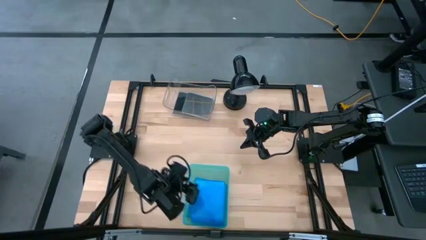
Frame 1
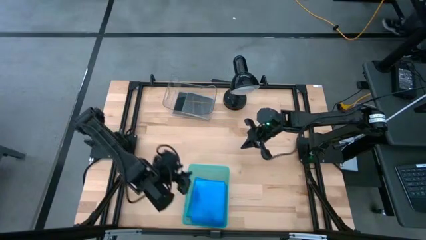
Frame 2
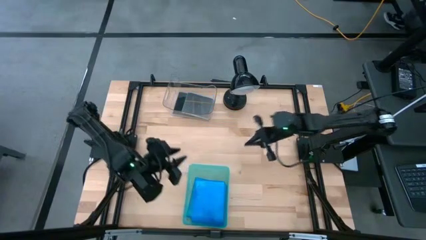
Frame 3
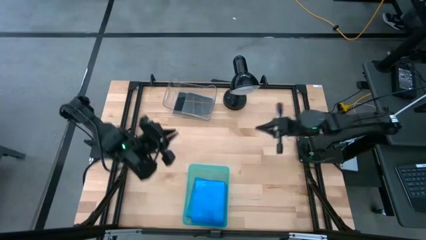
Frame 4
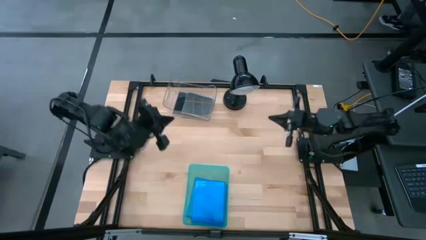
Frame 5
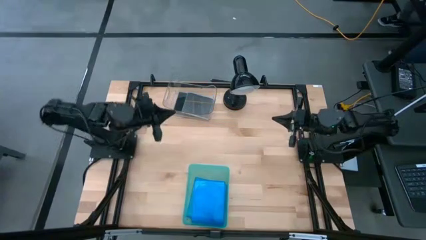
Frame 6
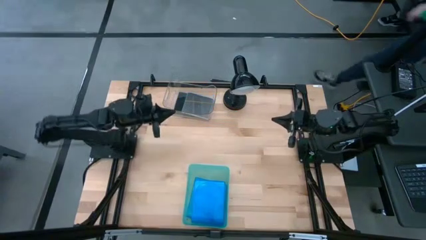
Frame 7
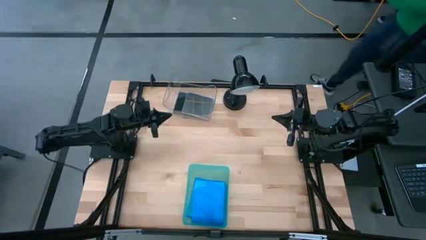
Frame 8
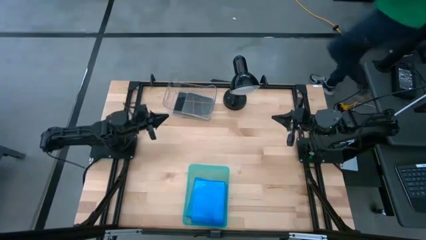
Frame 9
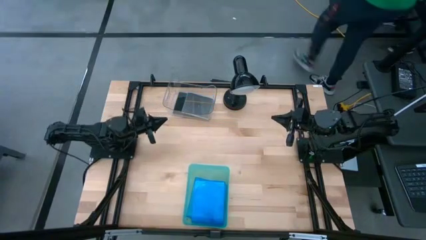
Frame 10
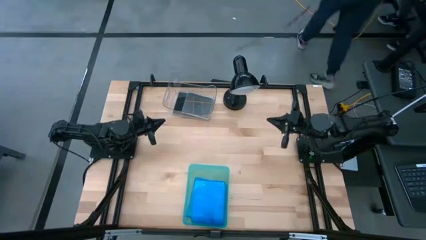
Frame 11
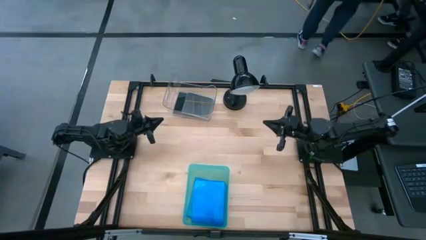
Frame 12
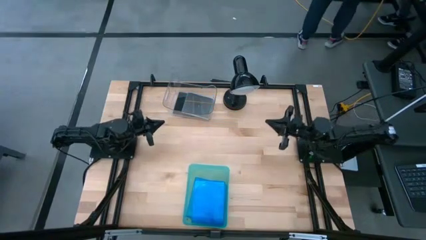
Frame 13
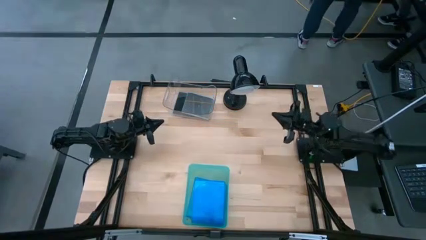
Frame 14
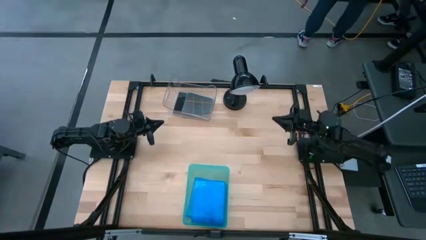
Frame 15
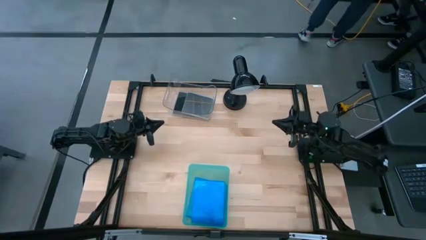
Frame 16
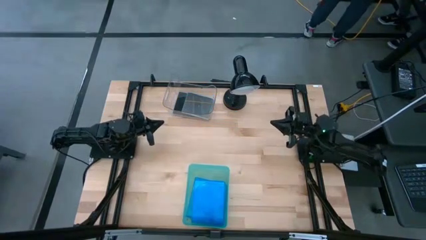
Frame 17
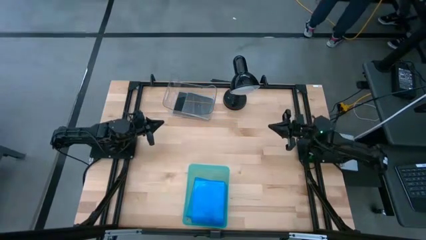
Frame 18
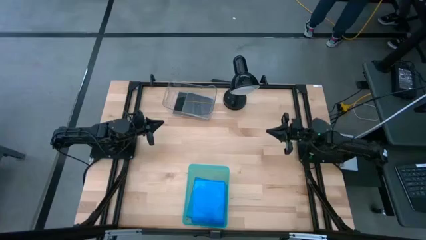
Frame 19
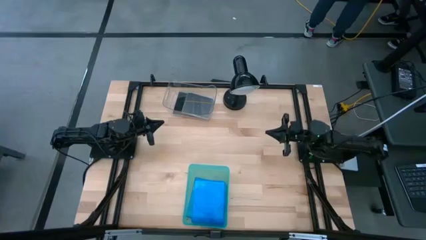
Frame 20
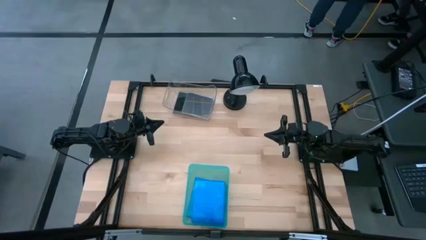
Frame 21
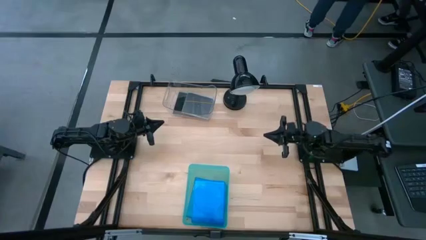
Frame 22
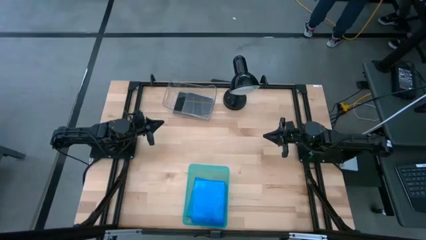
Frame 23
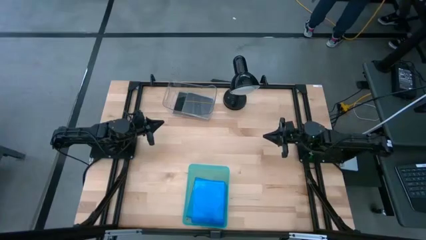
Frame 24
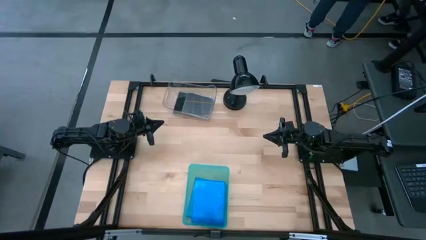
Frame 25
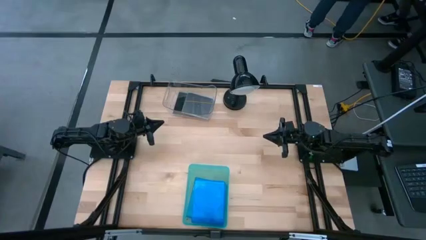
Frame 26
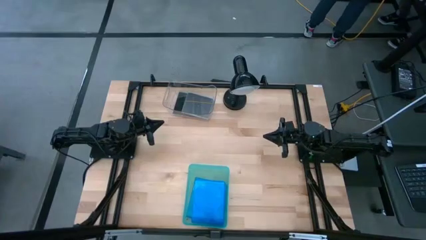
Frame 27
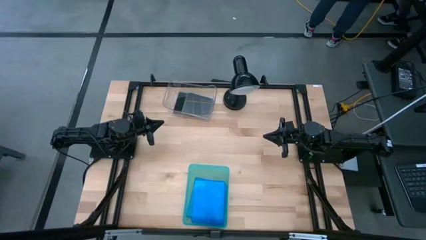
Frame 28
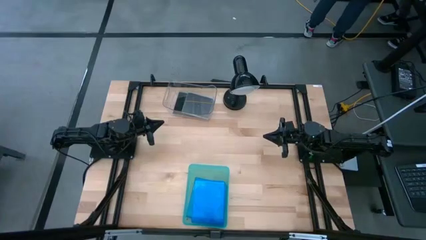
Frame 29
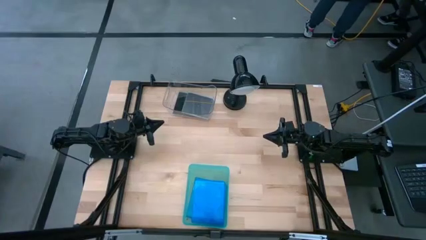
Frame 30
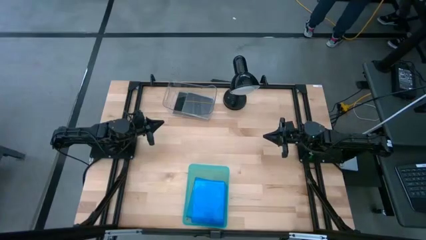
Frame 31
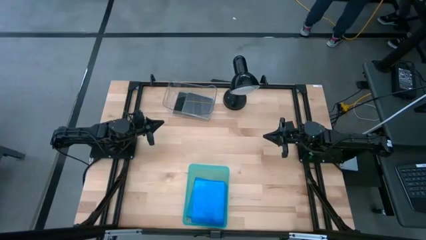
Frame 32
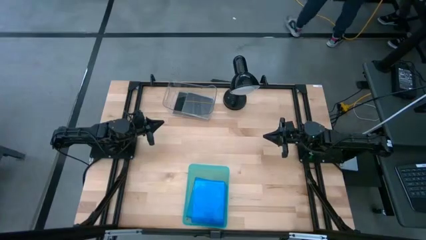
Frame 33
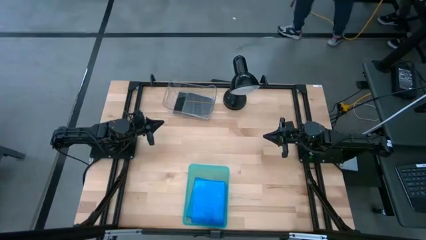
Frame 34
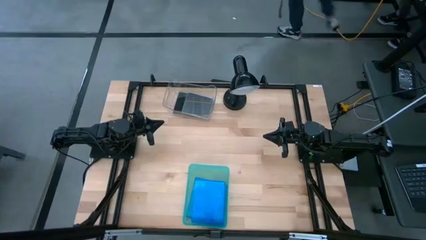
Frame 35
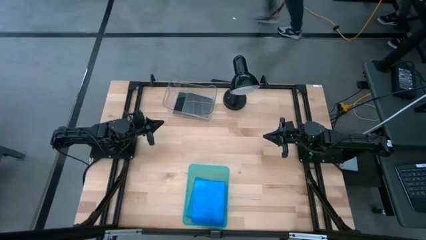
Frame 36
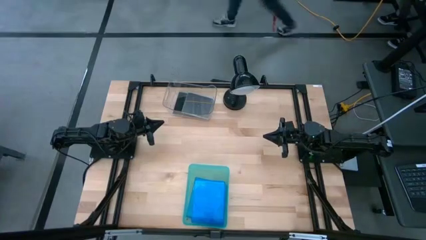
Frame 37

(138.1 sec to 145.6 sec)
Task: Pick & place jewel cases by type
Return to Home Position

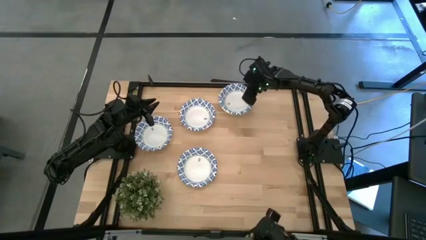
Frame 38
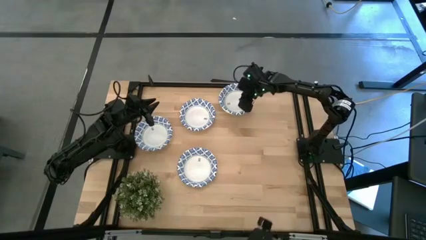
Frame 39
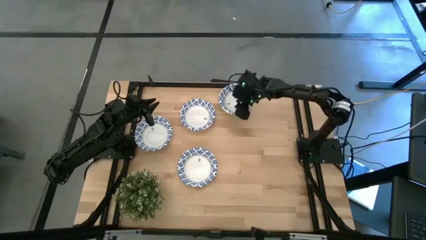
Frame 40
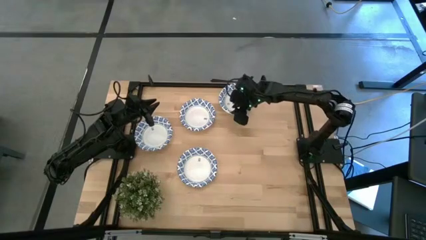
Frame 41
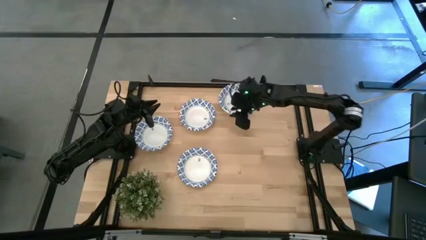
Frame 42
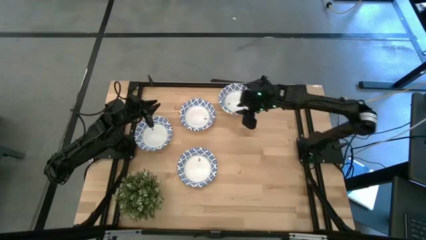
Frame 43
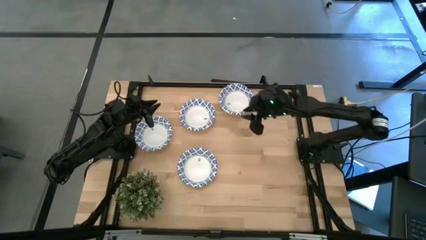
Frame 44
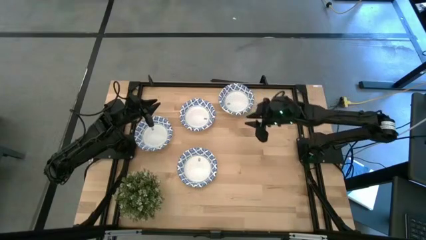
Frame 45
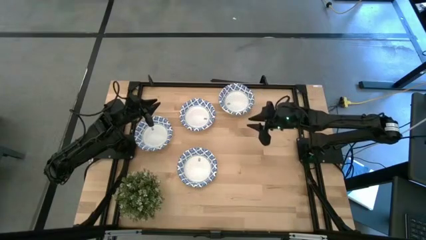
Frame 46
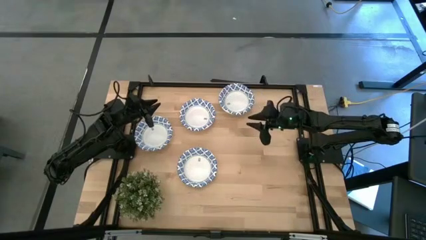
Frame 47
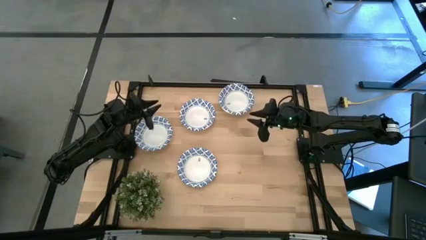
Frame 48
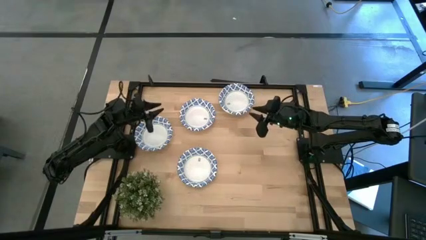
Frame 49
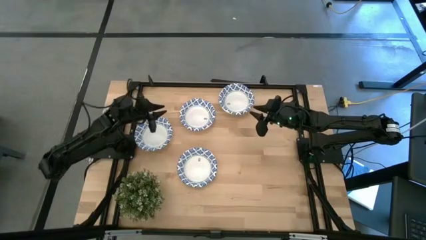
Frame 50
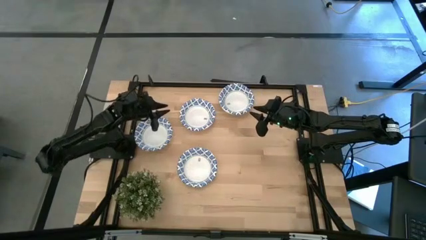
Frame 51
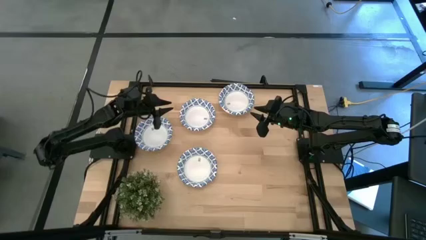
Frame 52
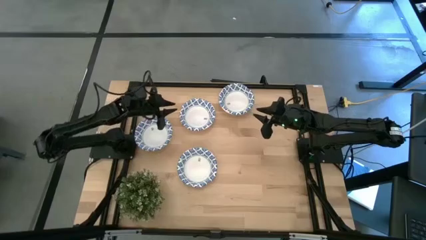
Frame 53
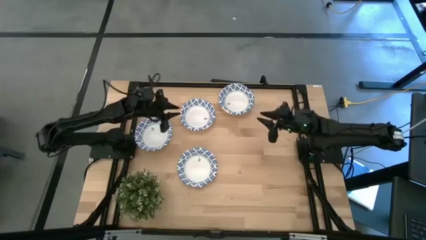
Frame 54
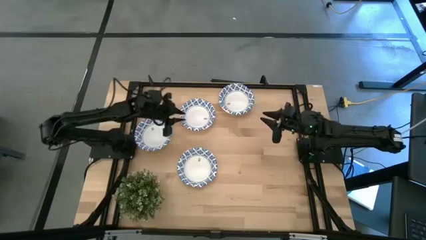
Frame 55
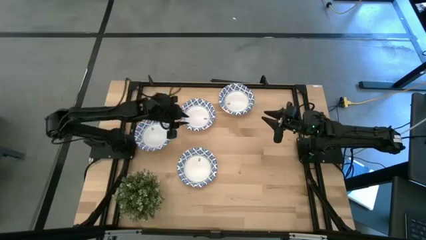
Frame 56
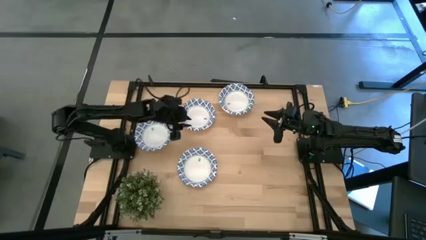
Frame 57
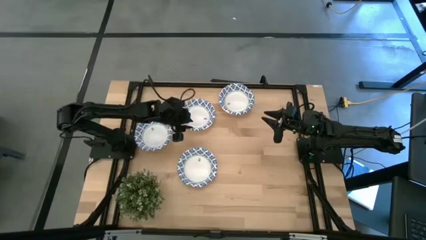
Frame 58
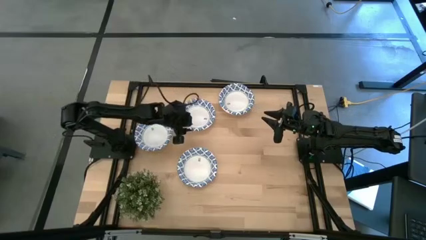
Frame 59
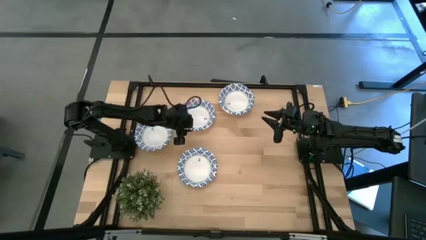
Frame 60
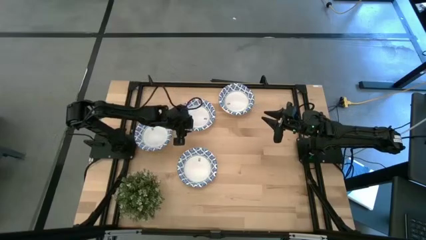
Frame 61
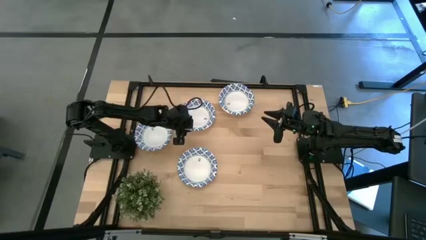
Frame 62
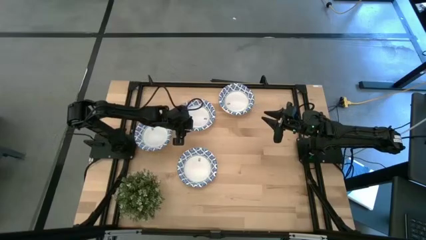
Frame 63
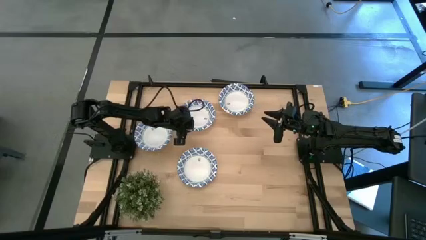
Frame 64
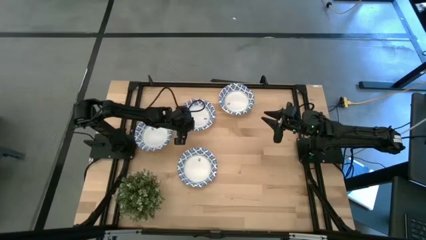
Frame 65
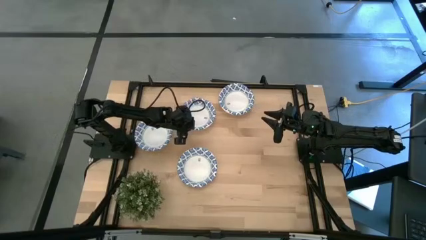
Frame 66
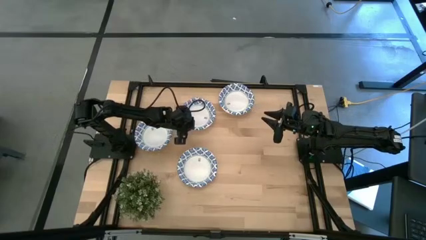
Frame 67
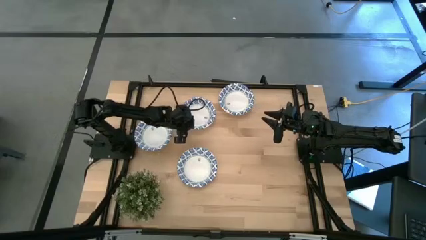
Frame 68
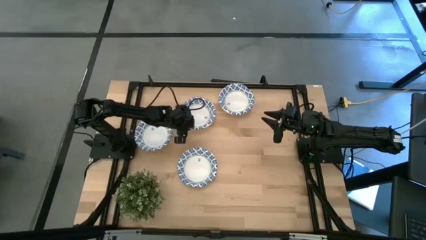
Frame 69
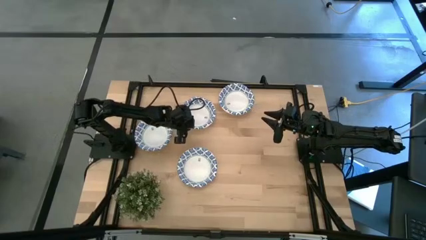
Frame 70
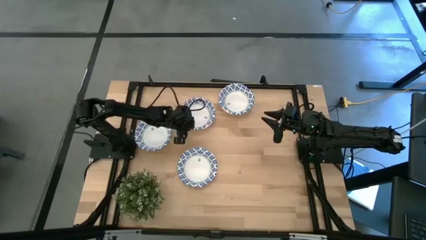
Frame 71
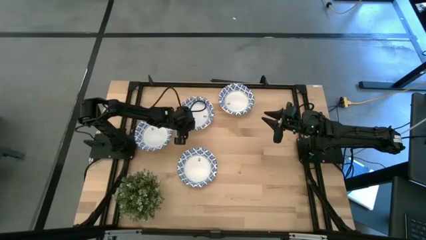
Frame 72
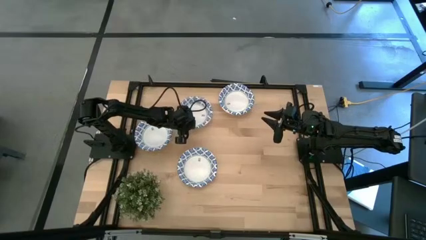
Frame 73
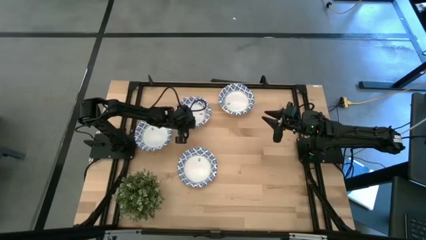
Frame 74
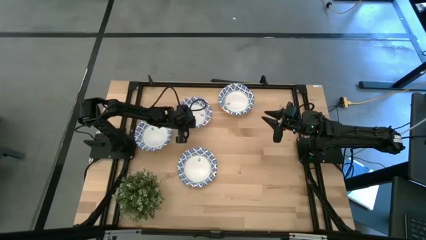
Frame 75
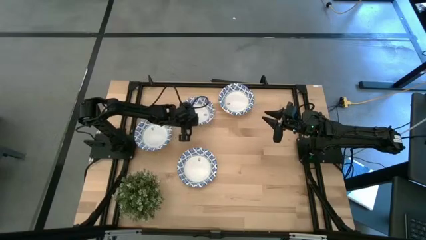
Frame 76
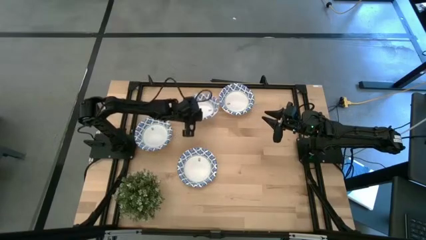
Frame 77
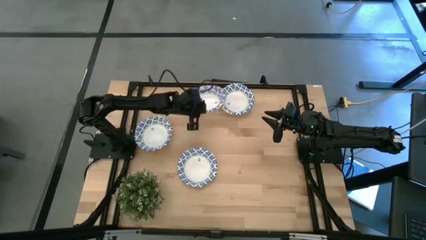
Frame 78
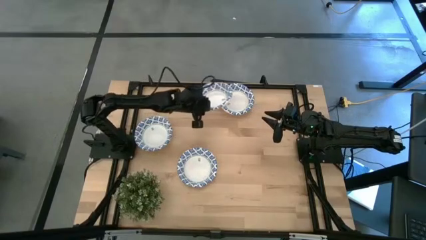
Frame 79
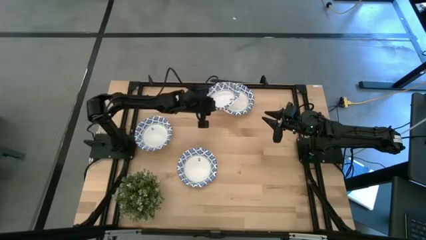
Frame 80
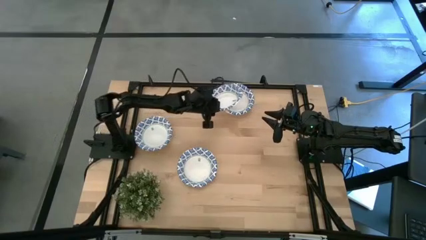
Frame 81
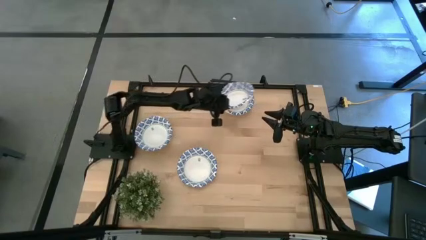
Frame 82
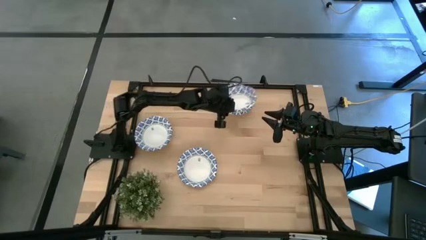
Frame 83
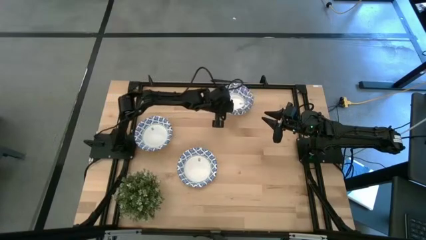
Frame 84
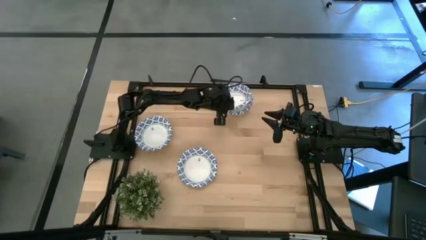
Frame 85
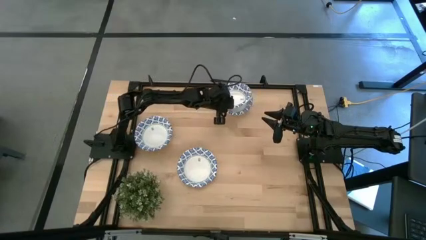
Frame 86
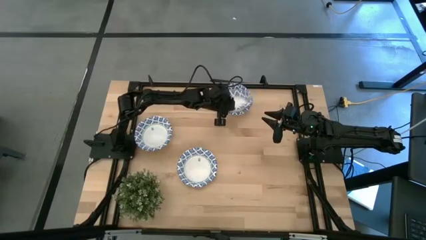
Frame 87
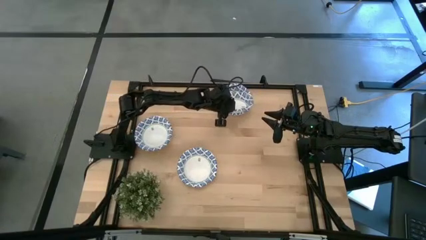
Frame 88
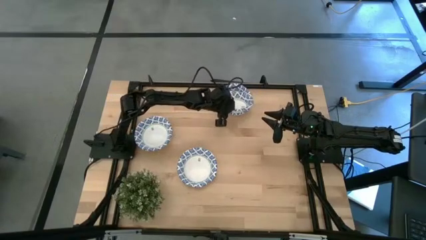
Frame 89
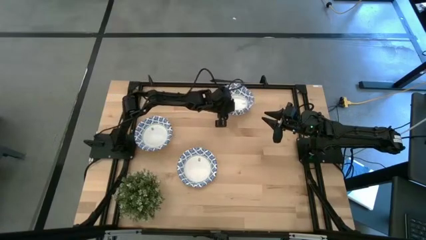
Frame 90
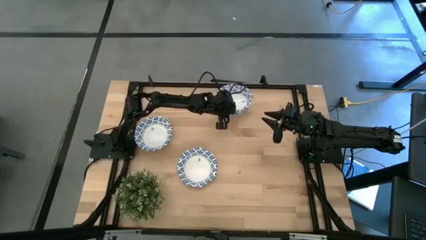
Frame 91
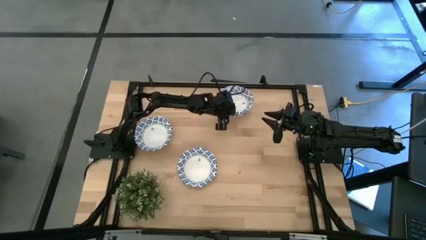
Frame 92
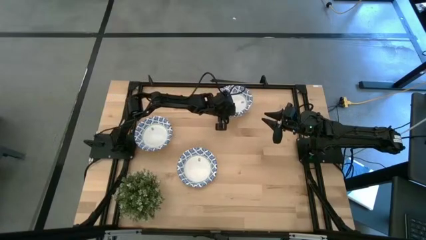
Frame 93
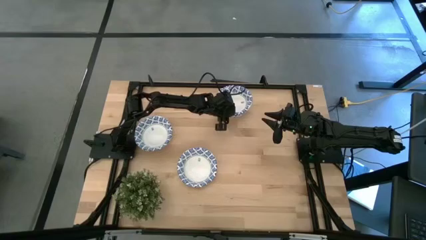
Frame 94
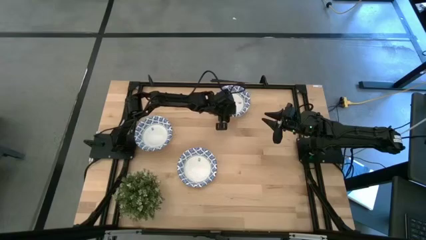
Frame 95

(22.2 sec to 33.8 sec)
Task: Nest bowls inside each other
Stack the top middle bowl on the right bowl
